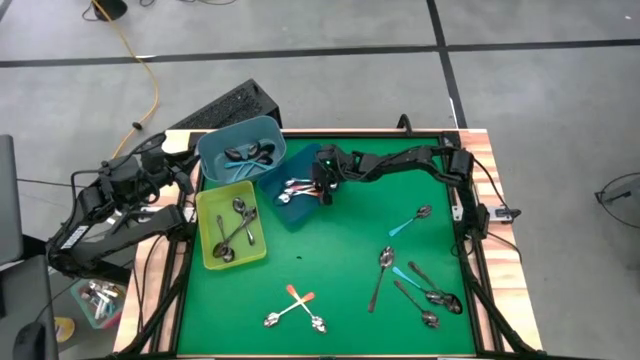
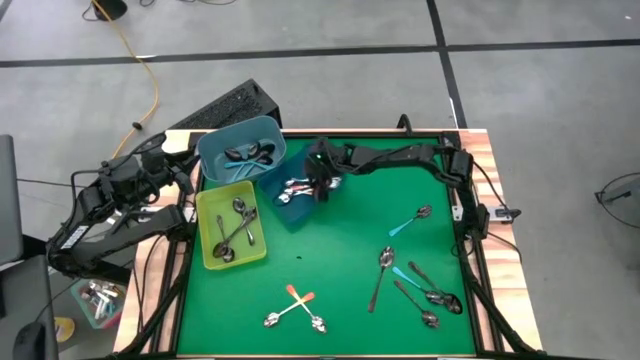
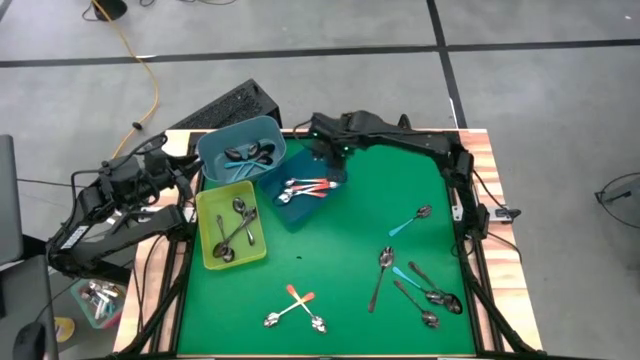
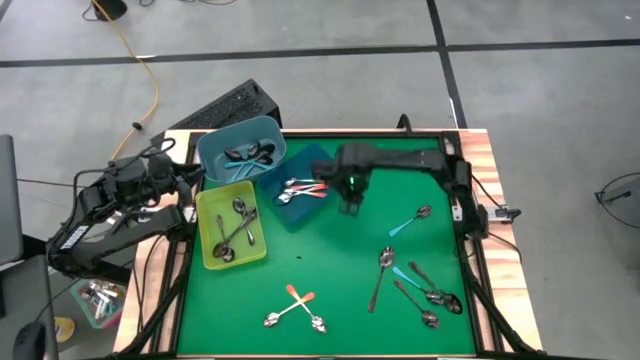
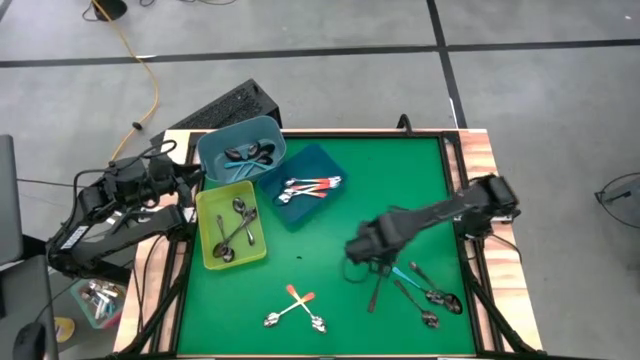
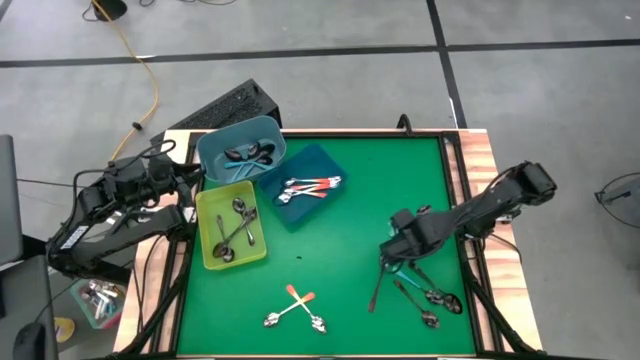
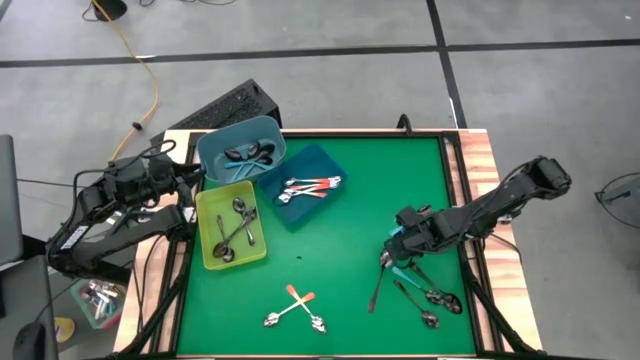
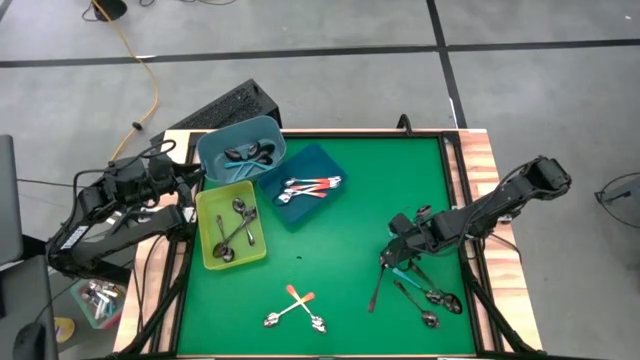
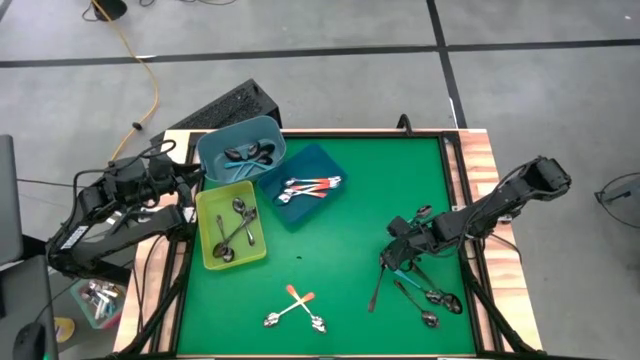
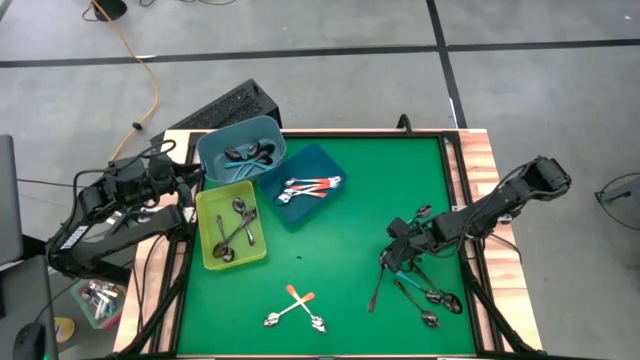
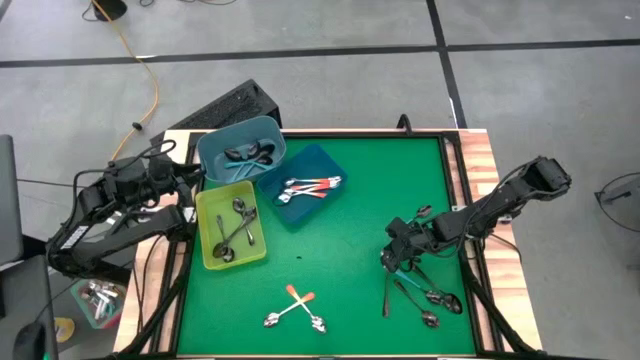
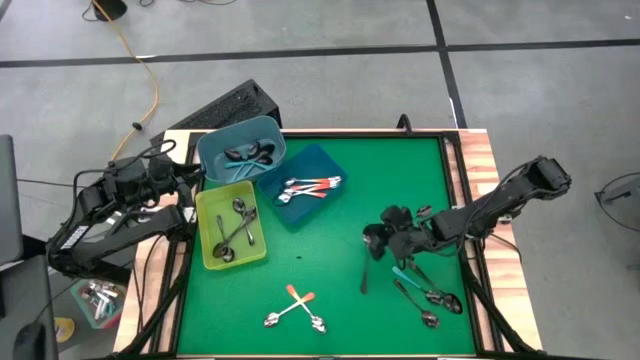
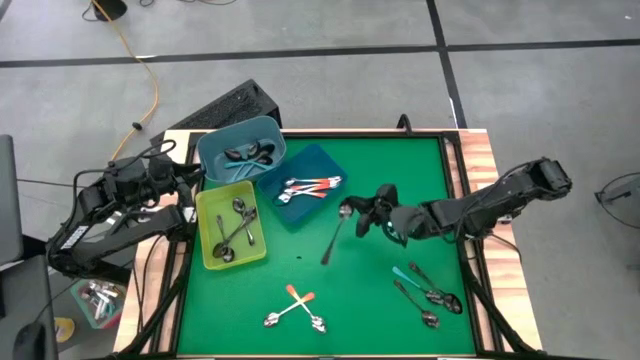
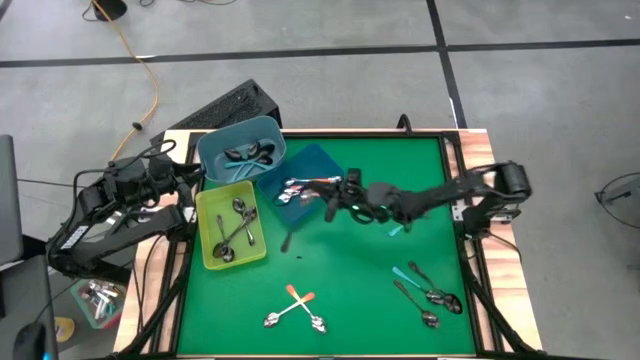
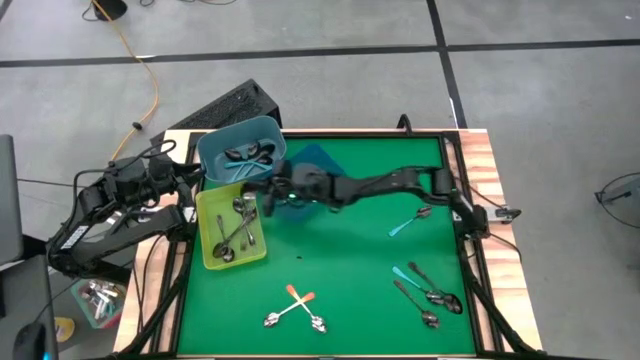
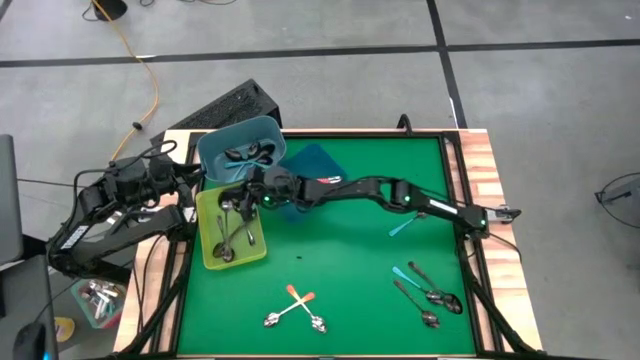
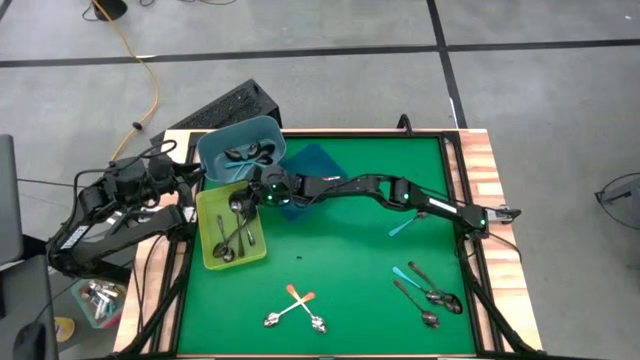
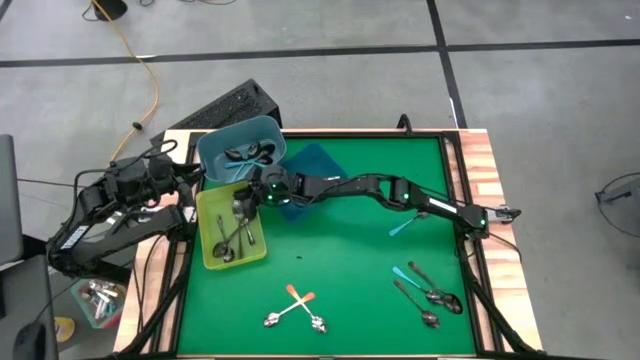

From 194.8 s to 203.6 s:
Task: Sort silverware by color (type)
Put the black spoon into the green bin

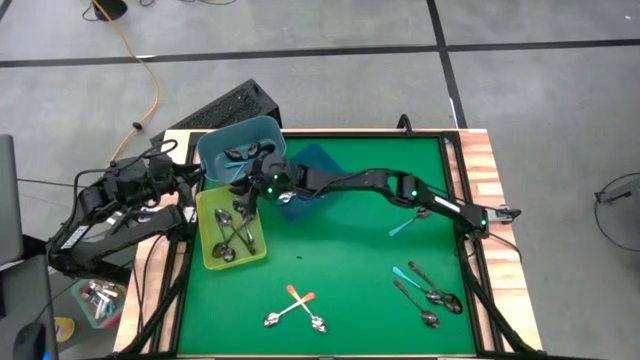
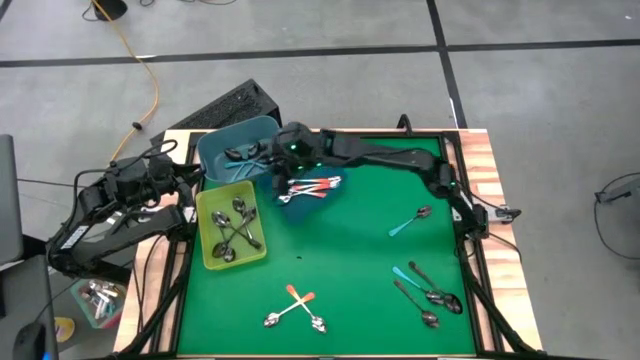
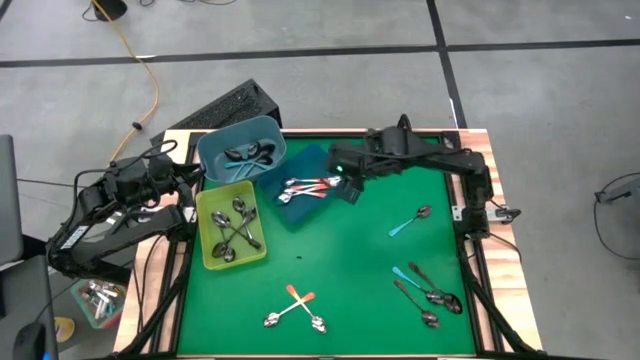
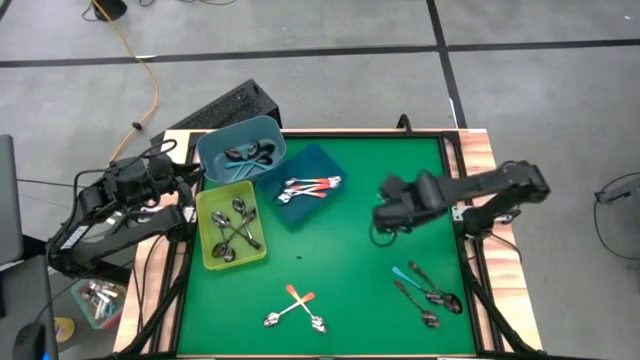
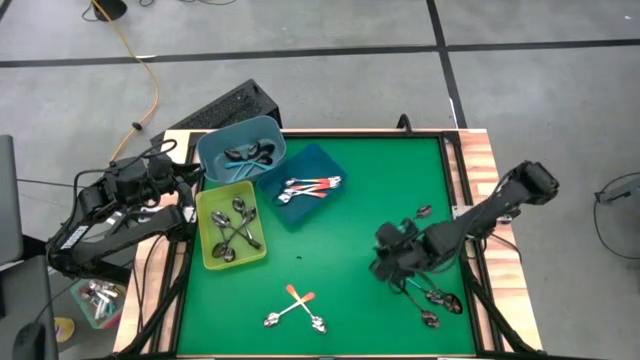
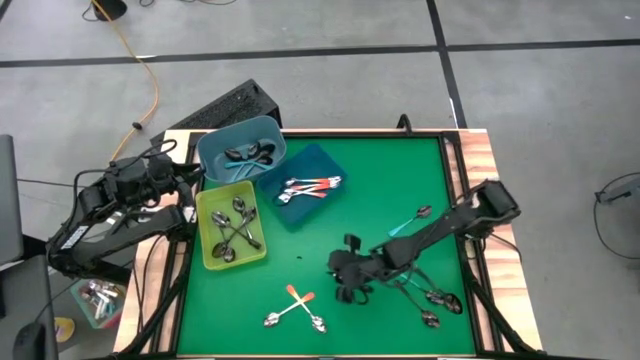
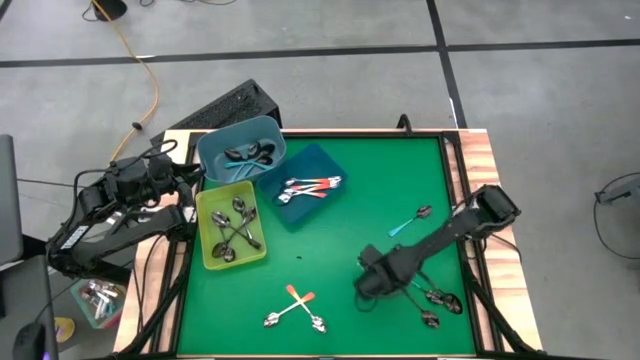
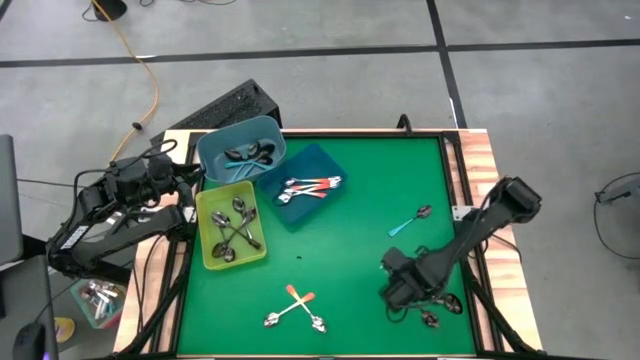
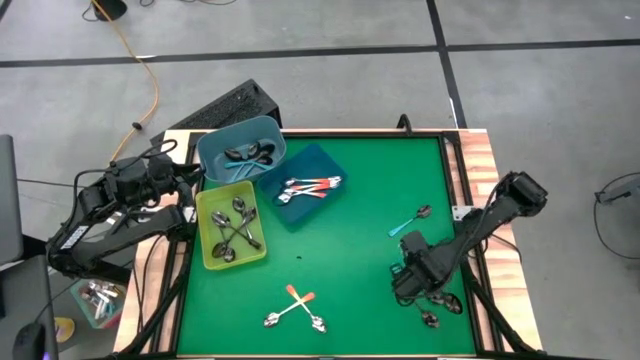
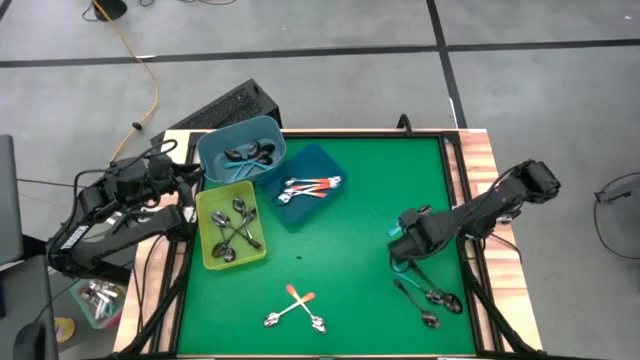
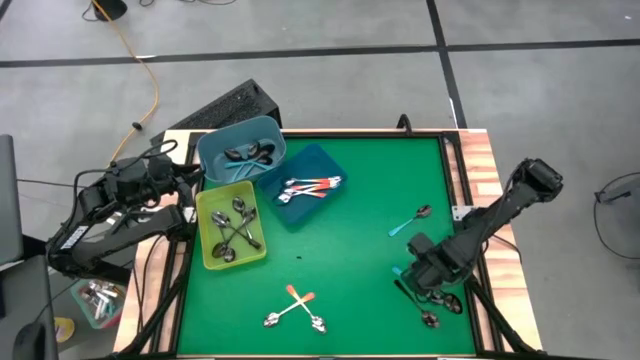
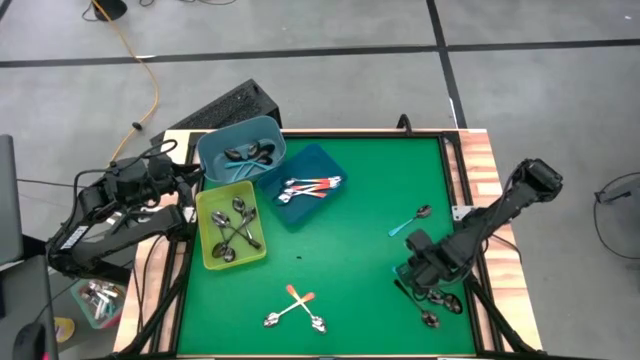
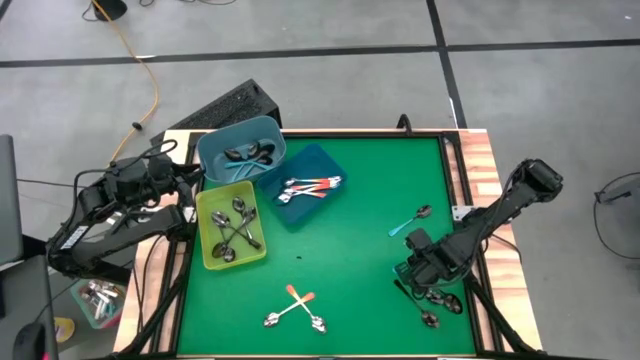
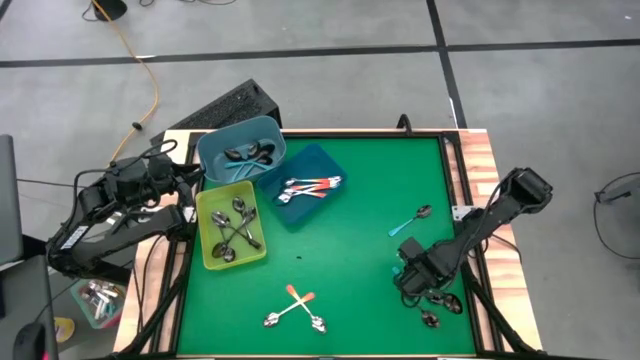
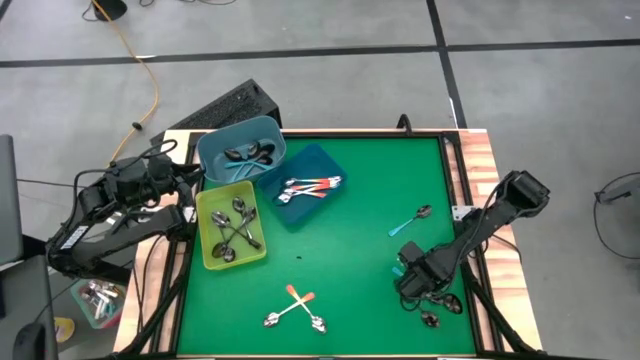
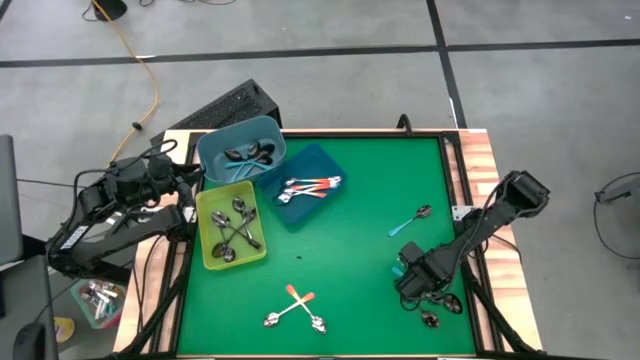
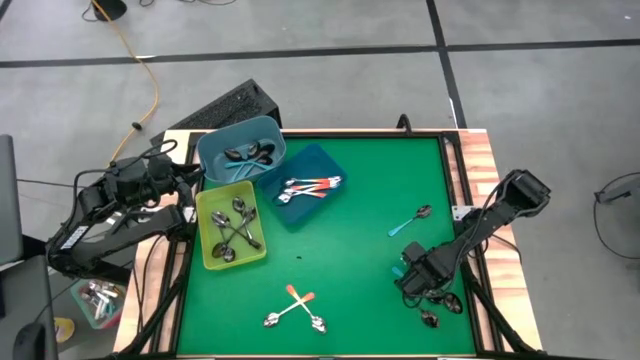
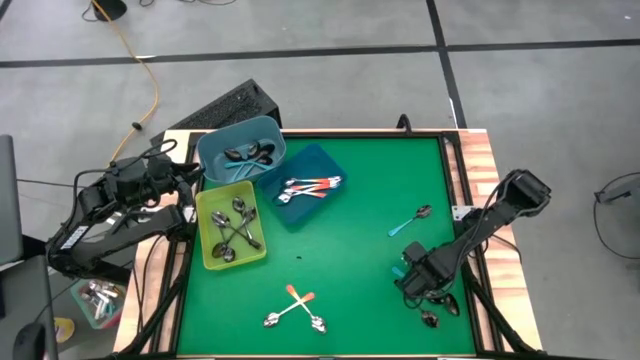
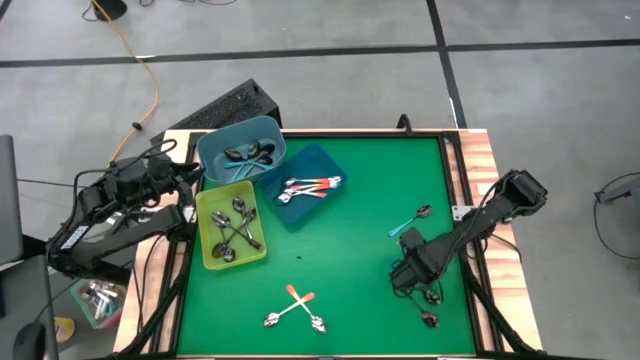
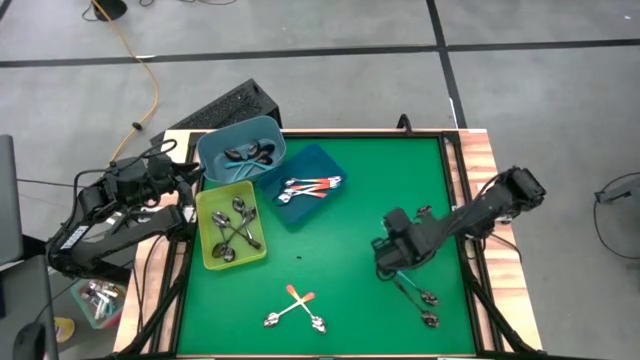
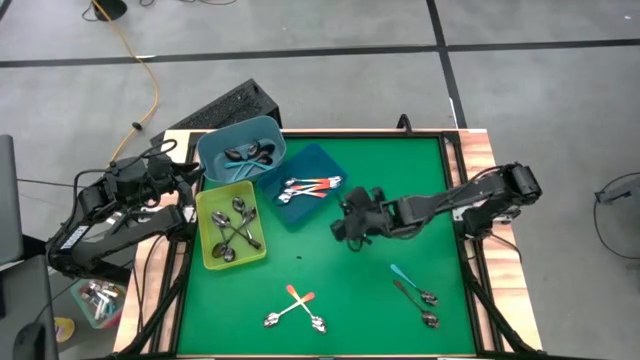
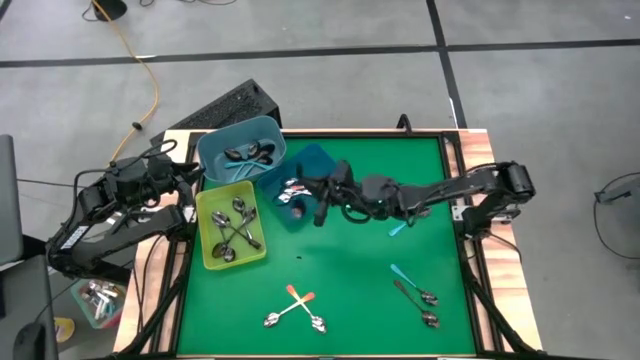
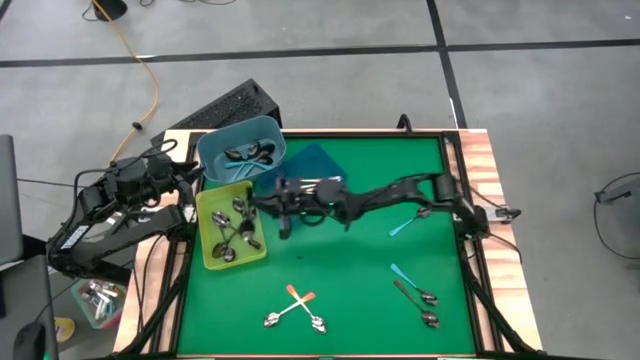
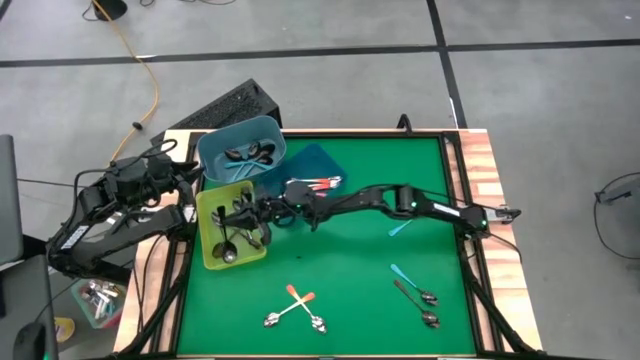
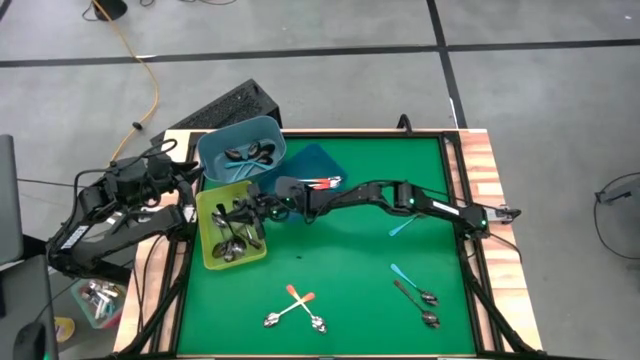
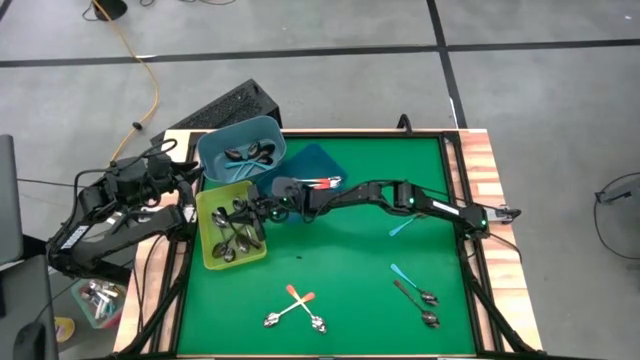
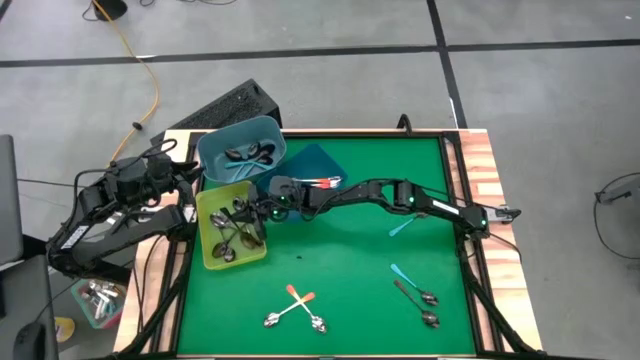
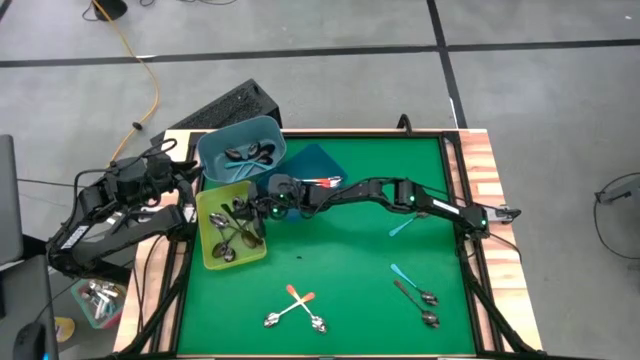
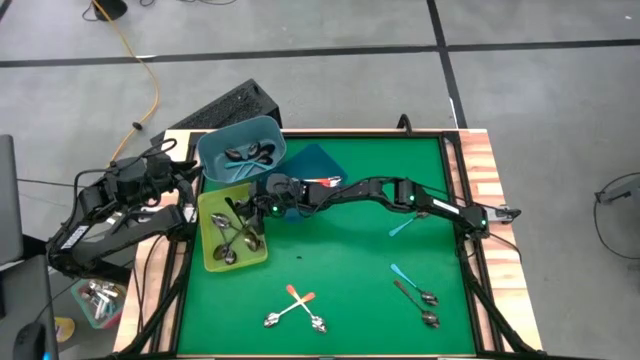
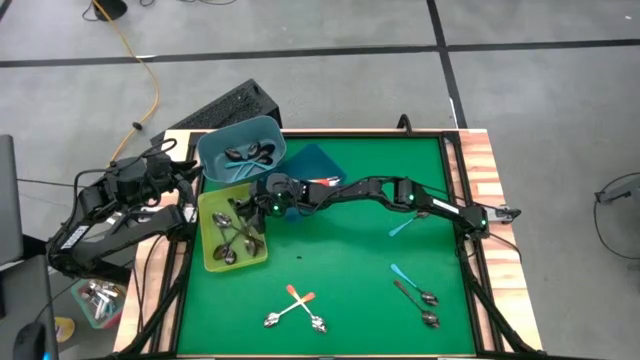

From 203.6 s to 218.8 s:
Put the black spoon into the green bin
